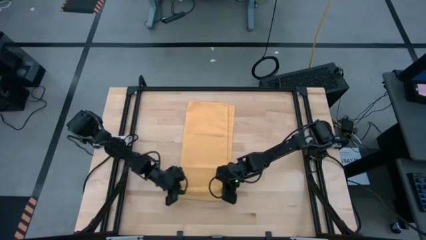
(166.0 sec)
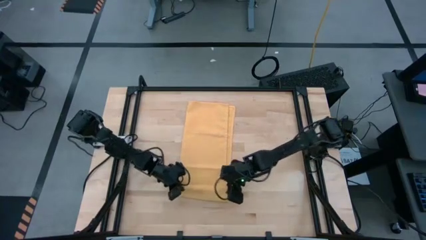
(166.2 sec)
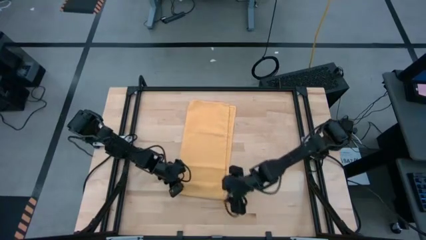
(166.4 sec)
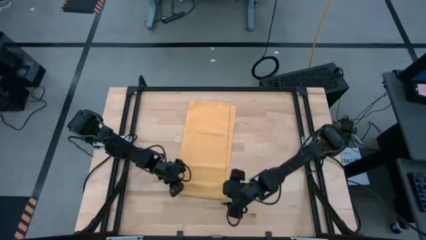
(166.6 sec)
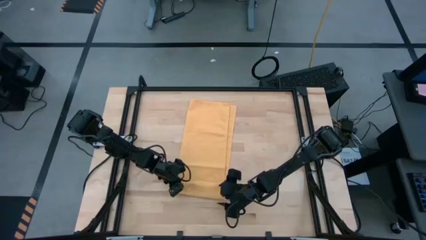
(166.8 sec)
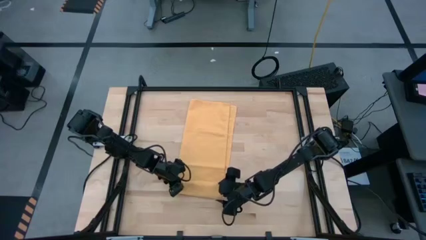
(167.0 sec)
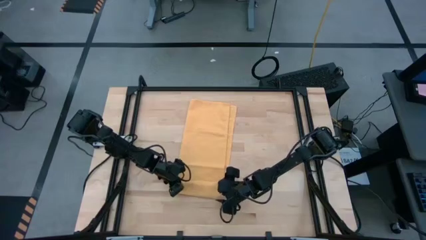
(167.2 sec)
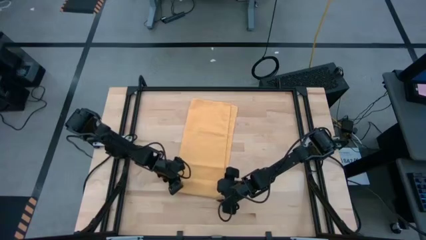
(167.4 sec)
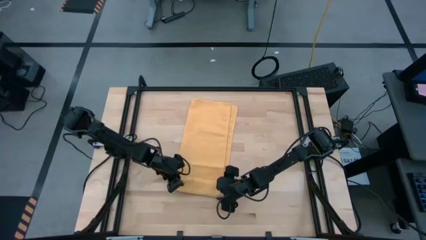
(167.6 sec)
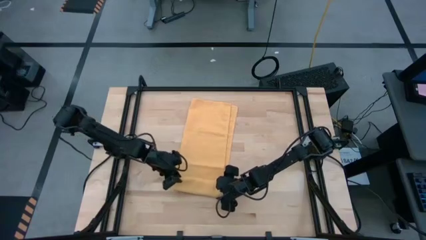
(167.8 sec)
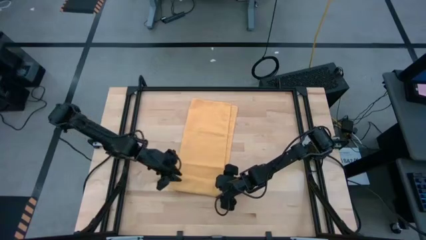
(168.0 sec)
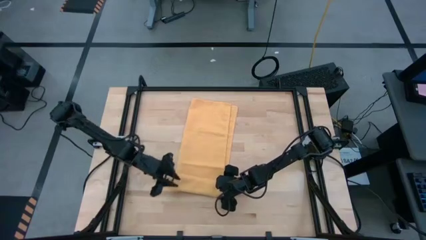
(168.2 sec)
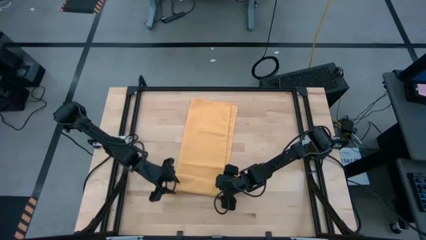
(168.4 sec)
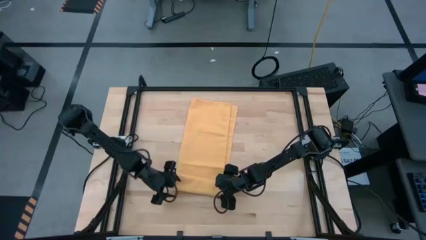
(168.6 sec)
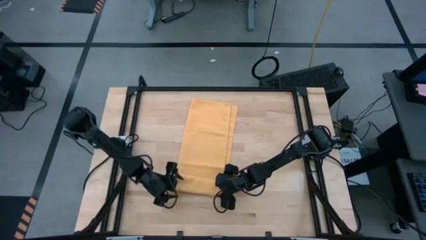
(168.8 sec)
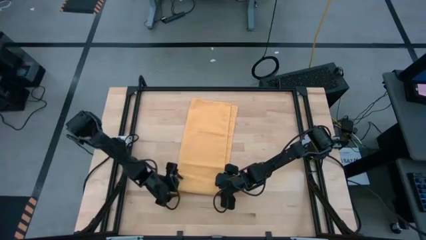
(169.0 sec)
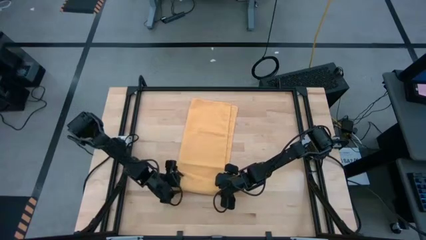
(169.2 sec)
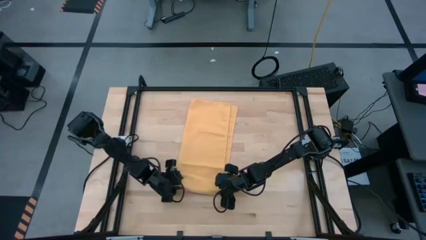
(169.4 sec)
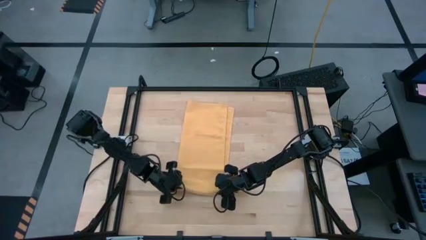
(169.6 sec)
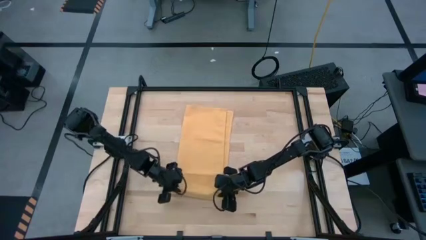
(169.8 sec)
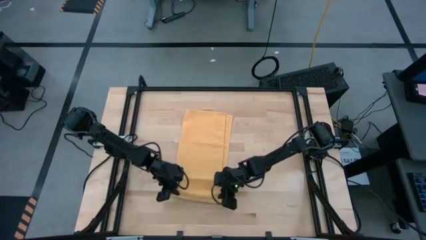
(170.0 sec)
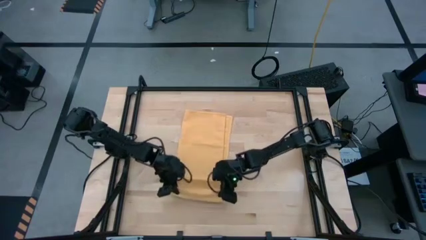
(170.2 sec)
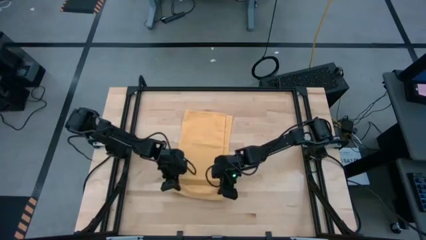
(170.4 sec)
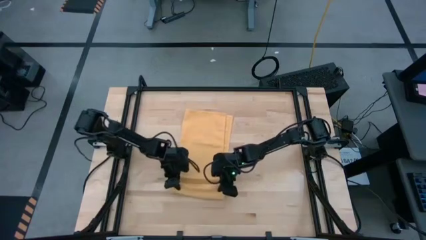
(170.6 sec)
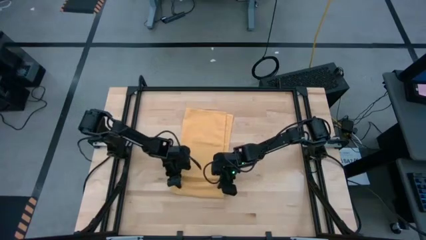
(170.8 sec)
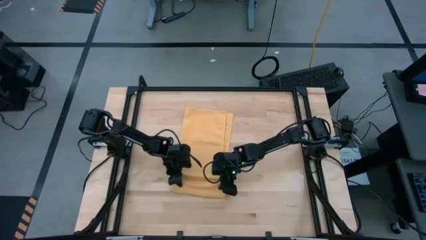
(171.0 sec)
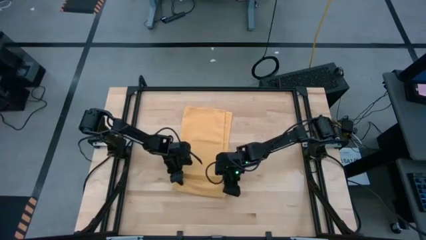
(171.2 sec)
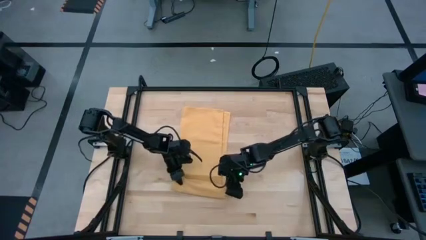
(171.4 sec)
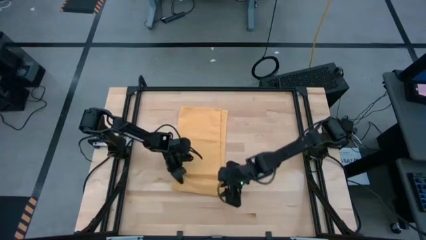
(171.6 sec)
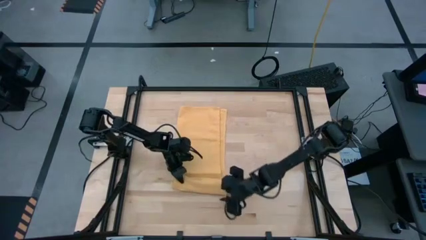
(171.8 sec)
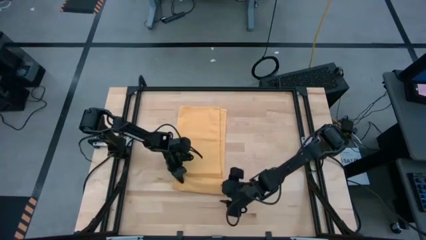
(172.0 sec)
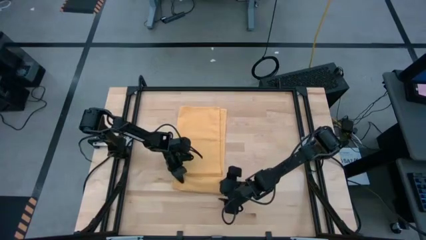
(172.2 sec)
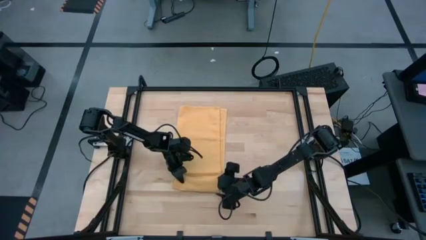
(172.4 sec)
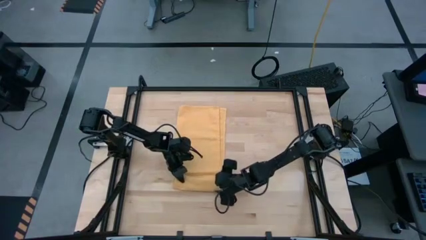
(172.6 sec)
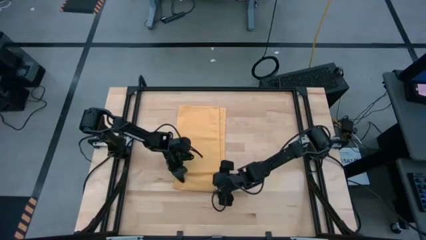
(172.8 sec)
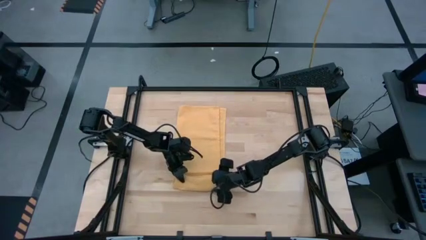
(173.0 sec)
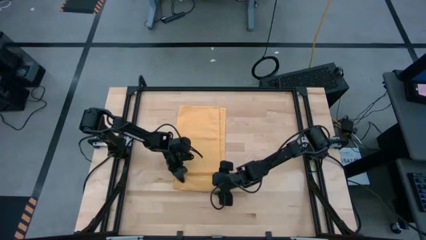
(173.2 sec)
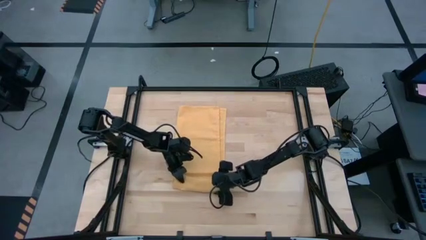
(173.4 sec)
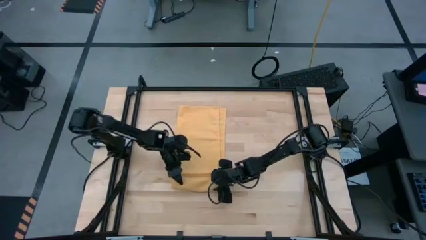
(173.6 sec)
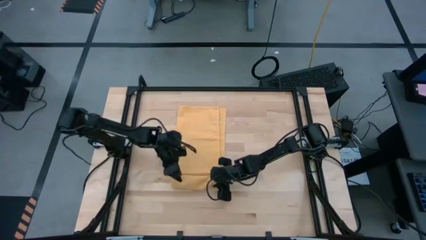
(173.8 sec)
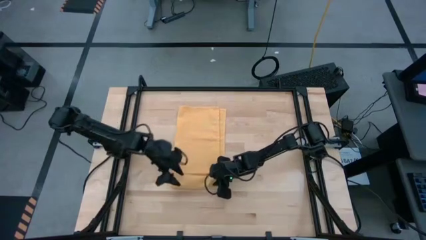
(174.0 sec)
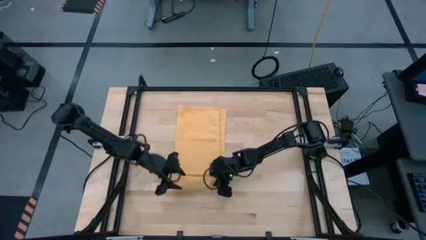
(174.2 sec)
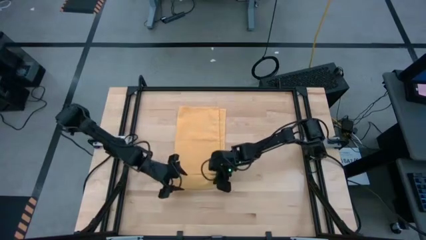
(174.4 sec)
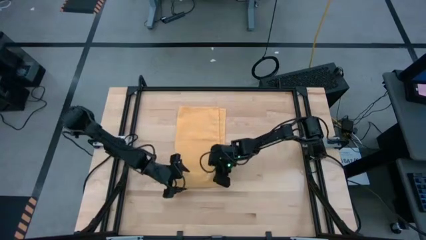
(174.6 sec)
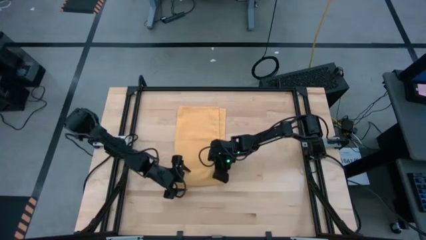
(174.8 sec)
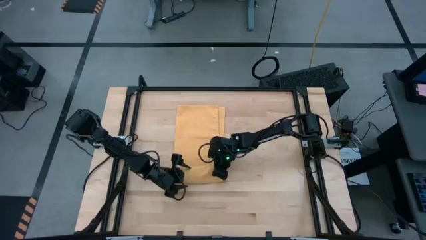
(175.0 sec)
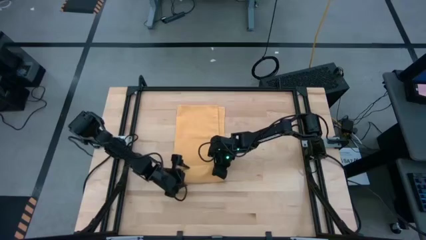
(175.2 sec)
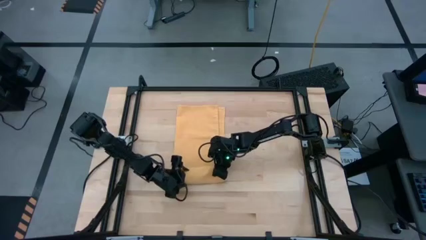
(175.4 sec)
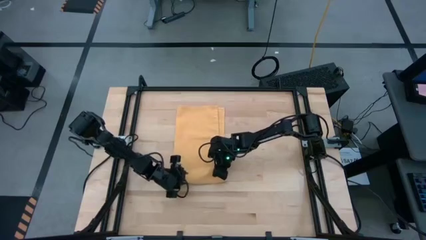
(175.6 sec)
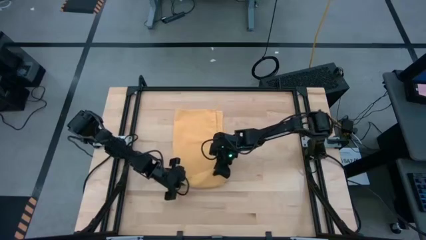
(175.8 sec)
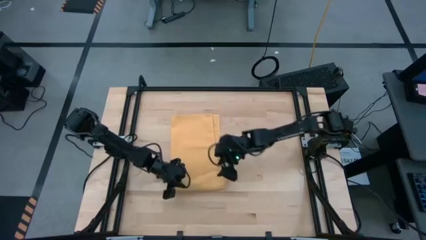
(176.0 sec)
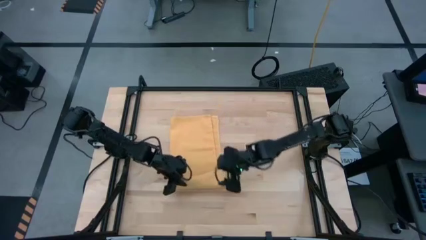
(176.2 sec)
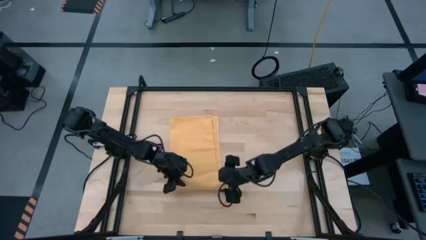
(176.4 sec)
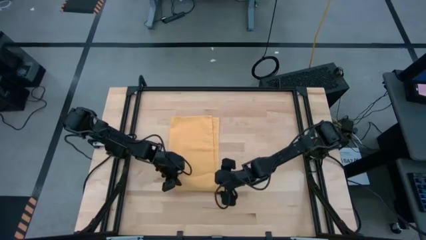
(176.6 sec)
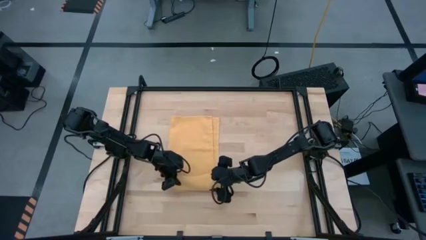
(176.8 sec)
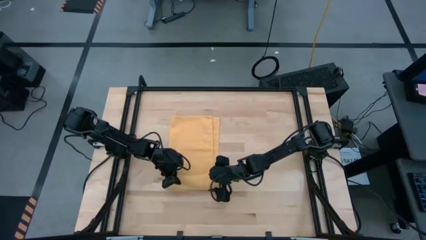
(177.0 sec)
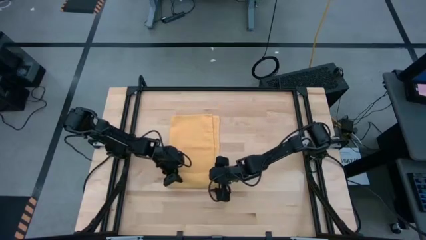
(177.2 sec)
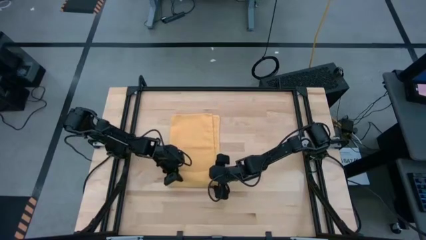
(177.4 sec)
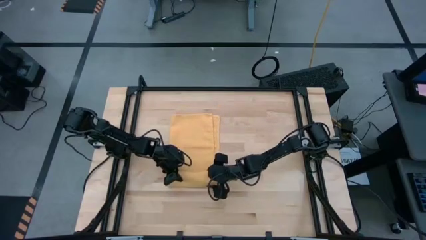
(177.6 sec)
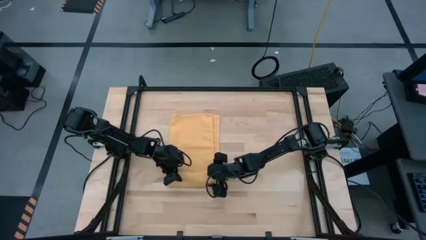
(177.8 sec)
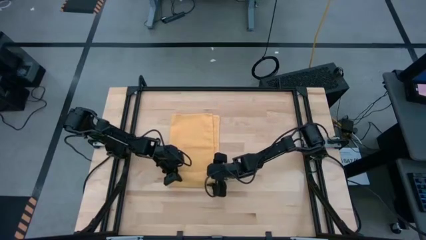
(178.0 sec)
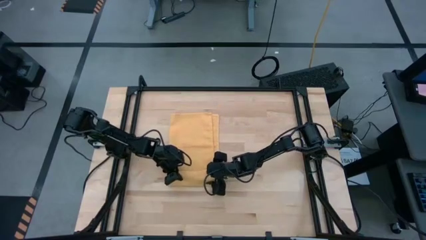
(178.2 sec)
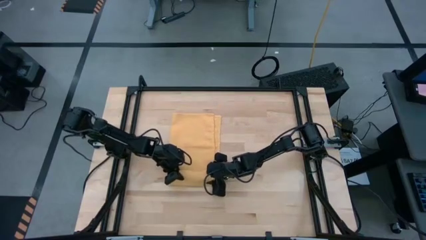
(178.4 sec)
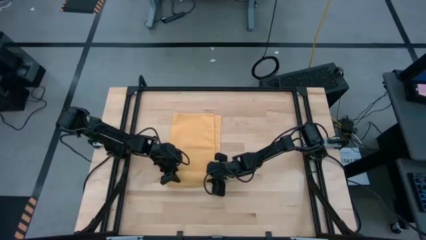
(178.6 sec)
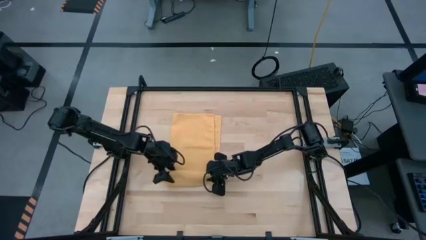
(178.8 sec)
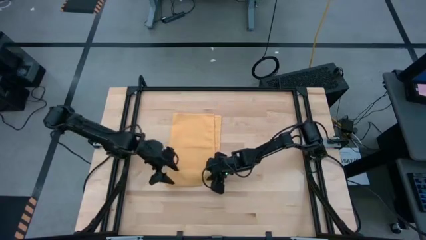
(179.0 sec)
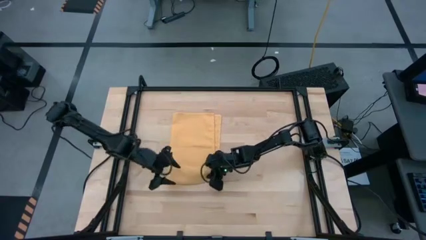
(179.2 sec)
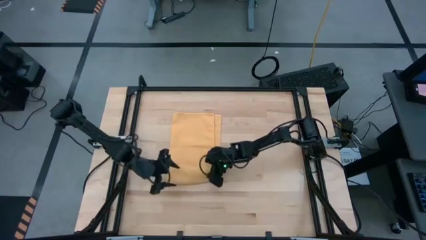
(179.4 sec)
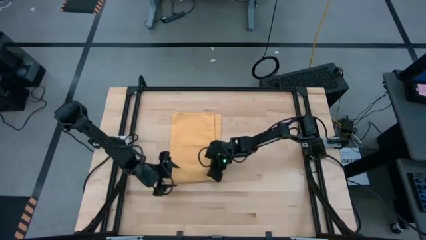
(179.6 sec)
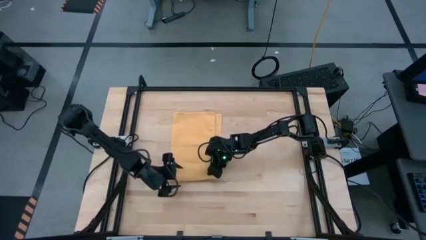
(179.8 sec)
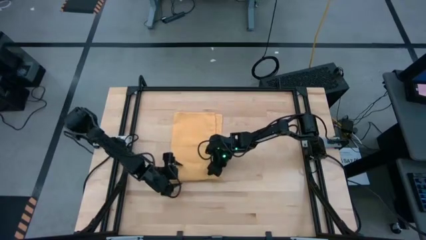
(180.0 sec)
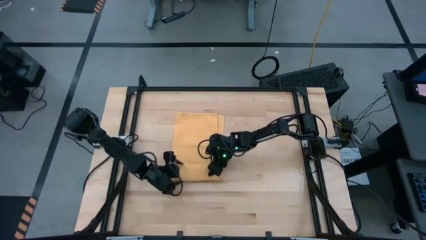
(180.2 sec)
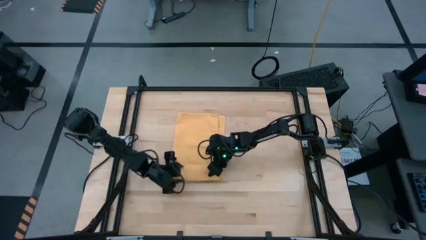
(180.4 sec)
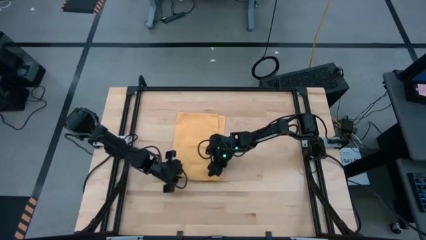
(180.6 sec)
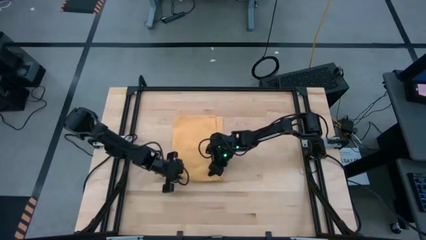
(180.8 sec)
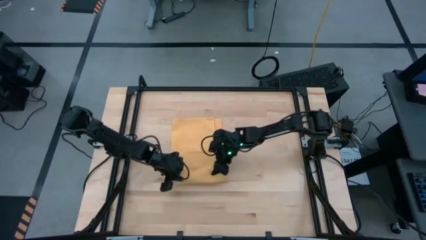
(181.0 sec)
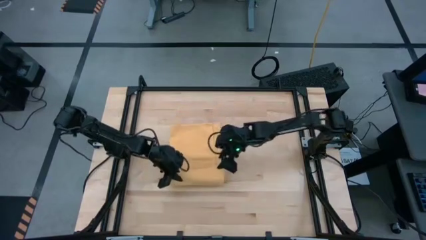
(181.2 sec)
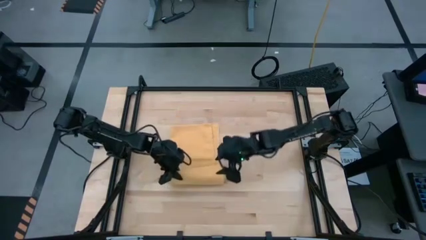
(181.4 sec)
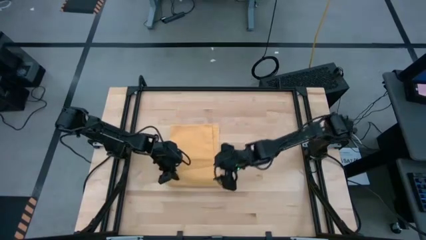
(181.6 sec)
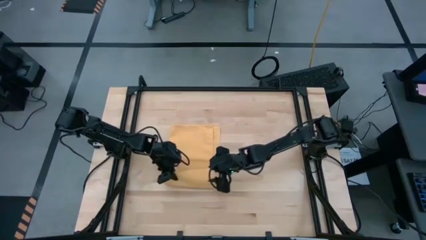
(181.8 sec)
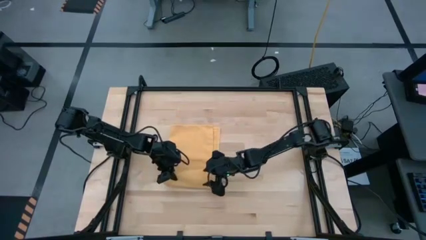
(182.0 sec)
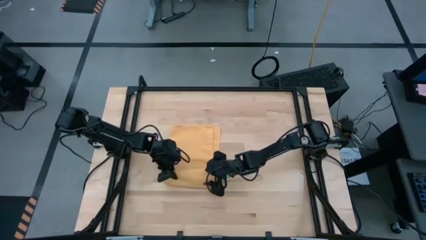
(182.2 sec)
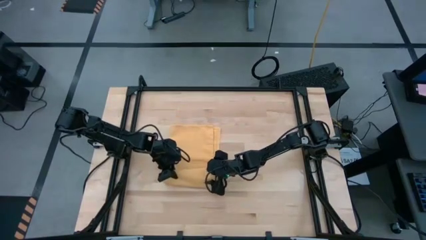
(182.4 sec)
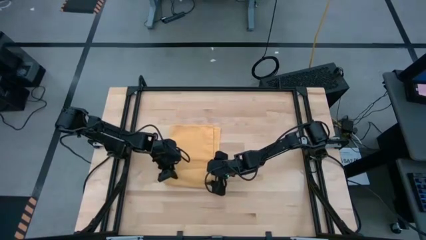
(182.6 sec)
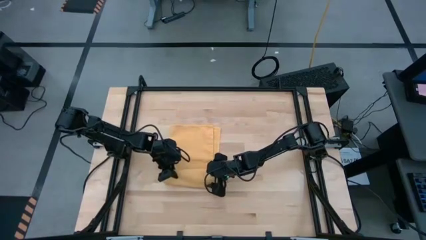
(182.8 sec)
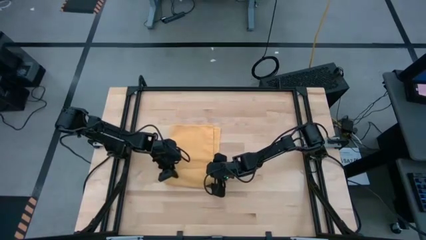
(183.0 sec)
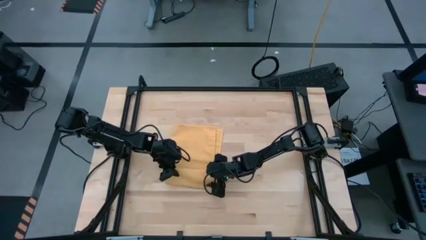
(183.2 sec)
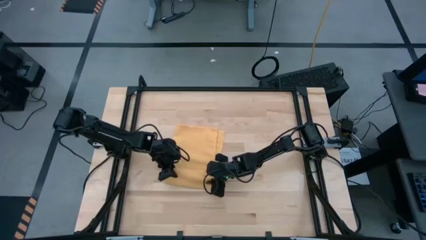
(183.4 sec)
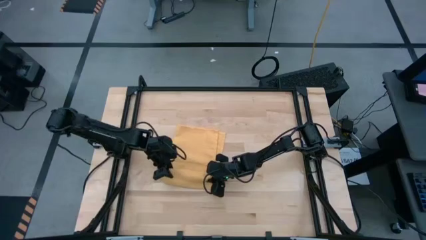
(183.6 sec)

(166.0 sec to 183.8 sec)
Task: Roll towel
Roll the yellow towel
